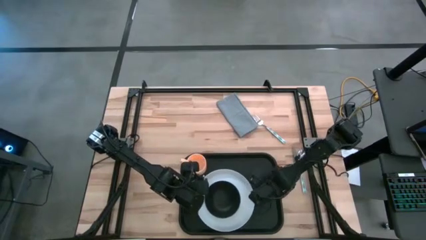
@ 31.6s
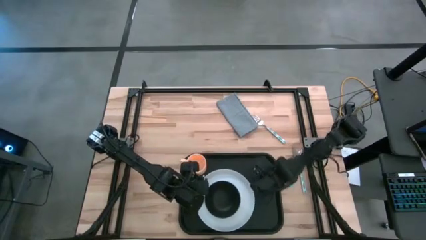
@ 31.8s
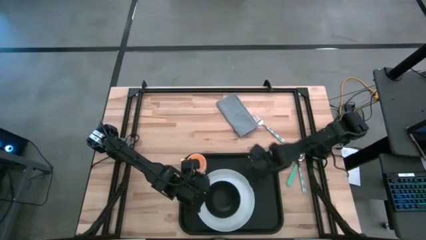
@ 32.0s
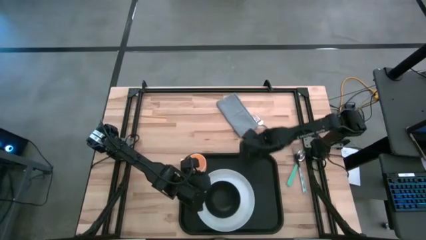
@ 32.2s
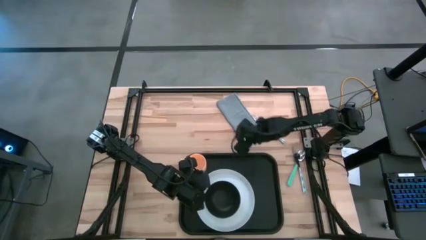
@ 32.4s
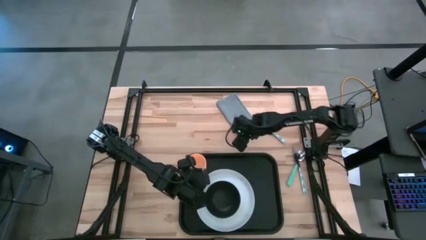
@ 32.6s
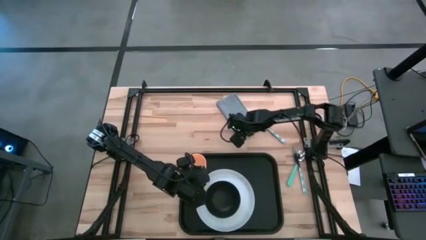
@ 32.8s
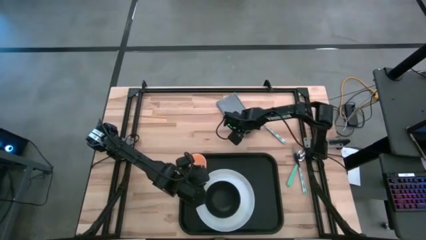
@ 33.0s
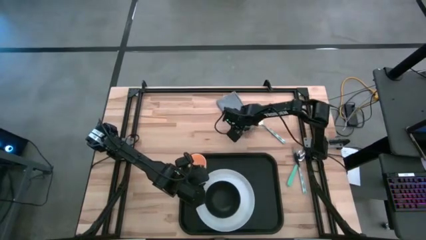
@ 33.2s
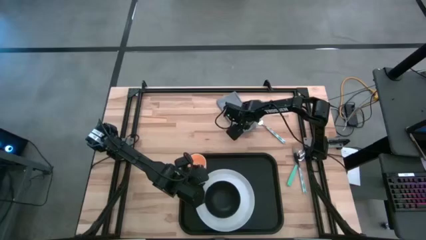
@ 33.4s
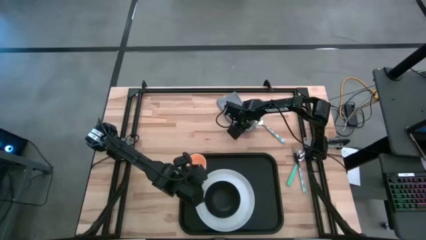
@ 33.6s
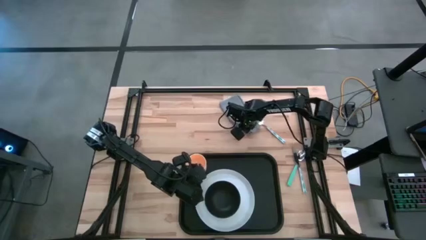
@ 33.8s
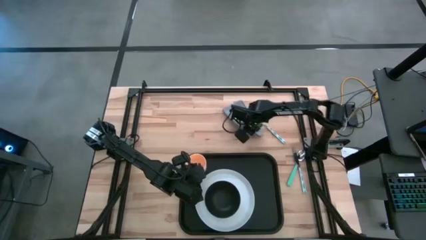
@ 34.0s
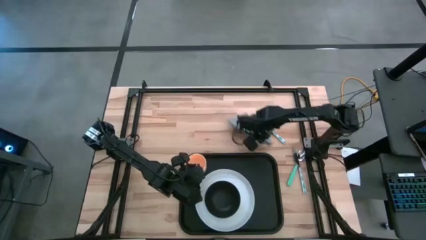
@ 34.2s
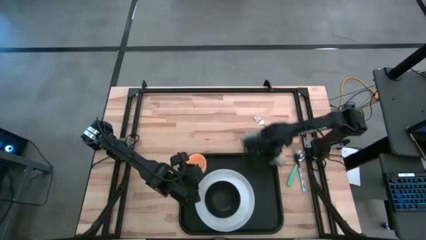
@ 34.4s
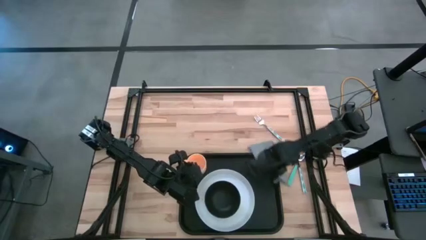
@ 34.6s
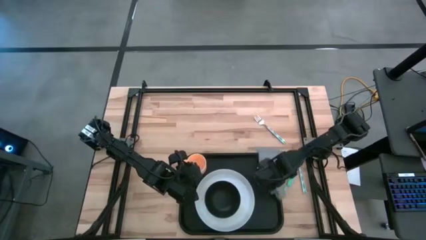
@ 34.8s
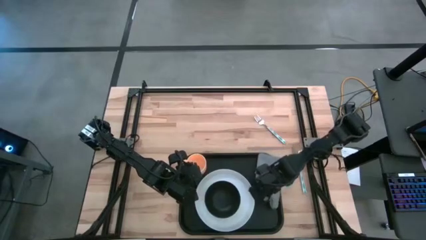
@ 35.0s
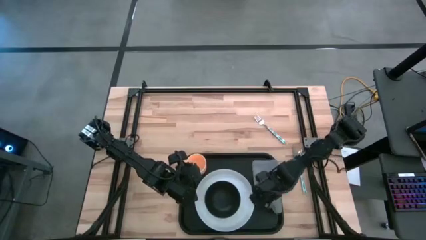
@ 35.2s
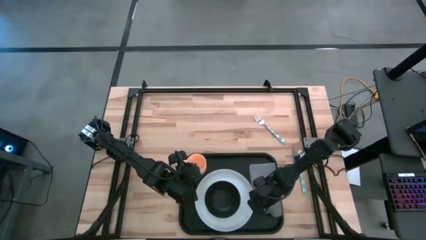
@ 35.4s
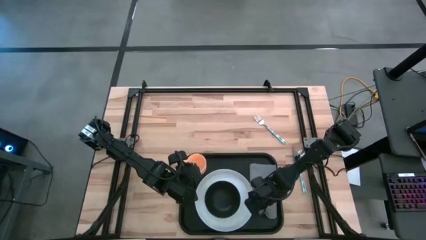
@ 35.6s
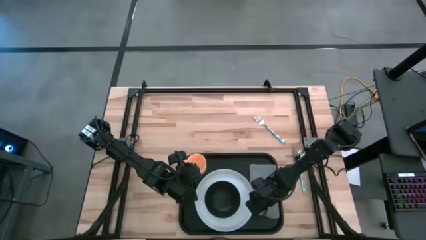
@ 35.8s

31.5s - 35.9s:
Task: Set up tray
Put the gray napkin on the black tray to the right of the white plate

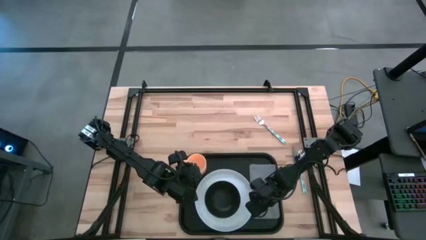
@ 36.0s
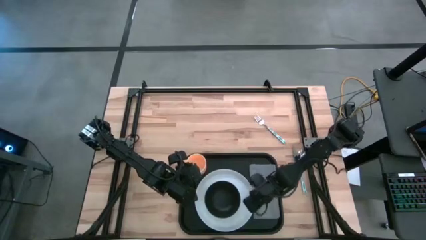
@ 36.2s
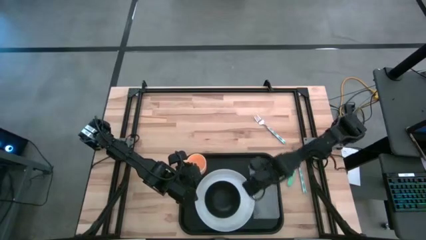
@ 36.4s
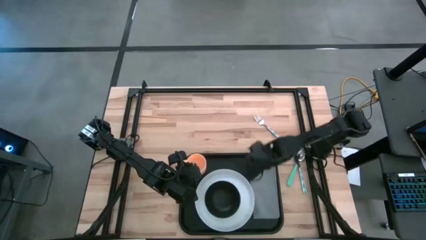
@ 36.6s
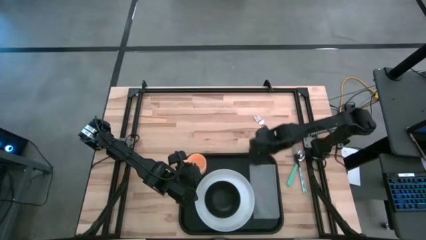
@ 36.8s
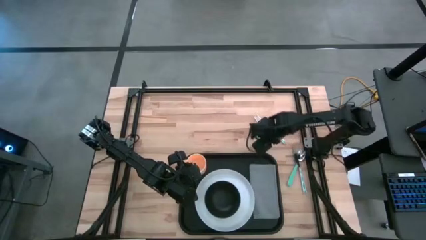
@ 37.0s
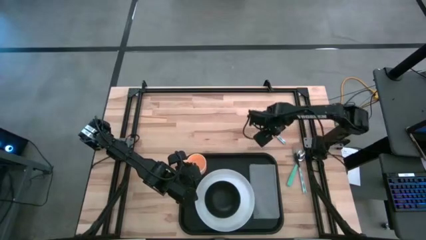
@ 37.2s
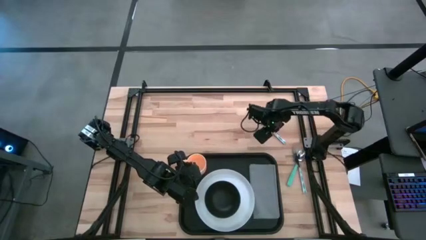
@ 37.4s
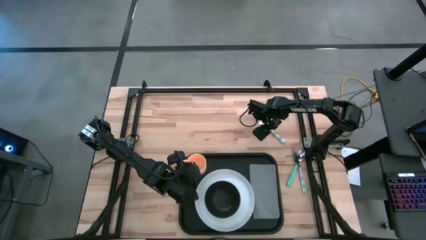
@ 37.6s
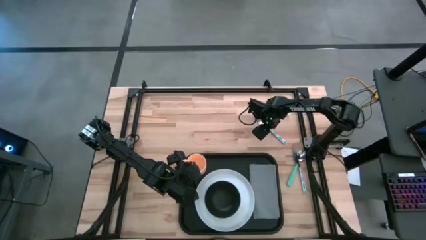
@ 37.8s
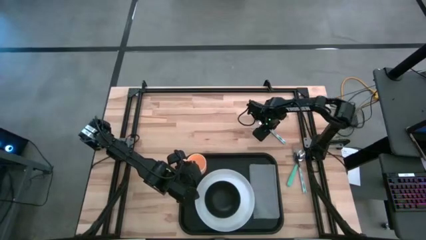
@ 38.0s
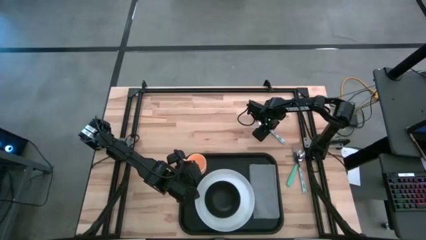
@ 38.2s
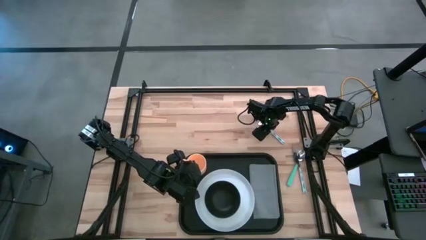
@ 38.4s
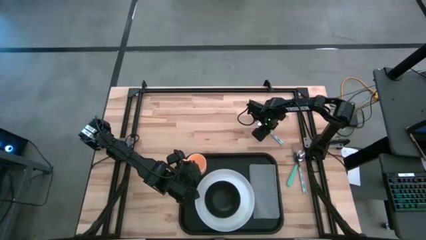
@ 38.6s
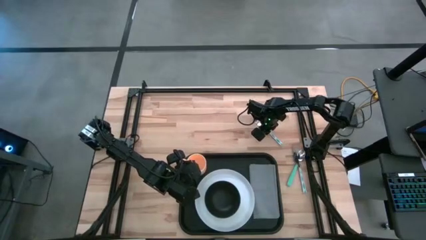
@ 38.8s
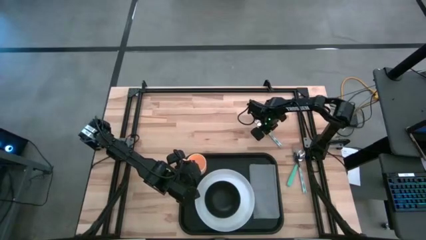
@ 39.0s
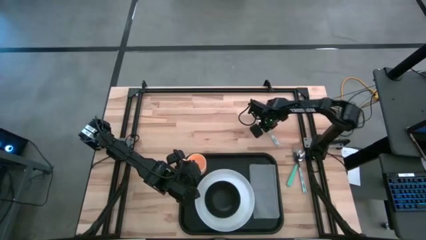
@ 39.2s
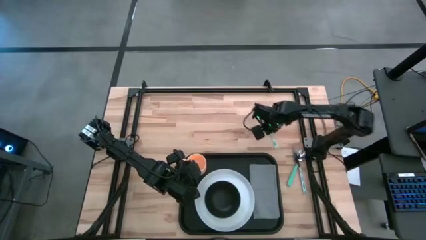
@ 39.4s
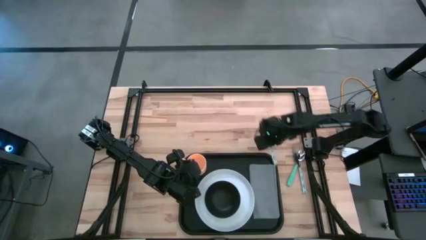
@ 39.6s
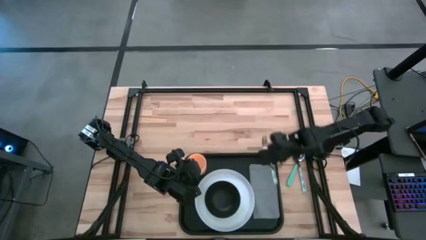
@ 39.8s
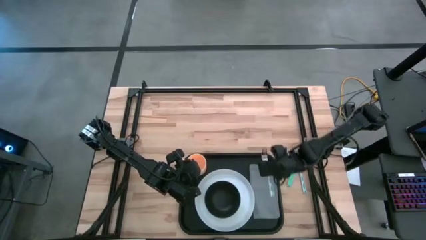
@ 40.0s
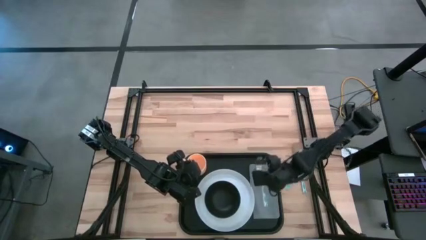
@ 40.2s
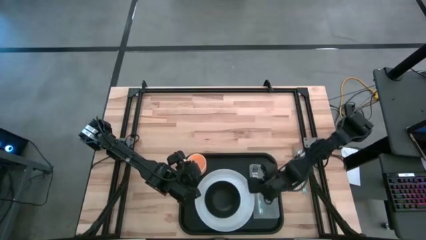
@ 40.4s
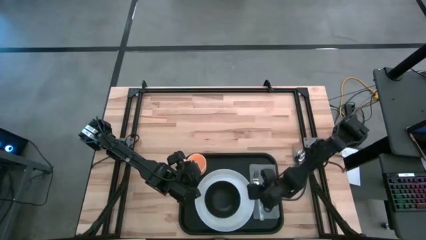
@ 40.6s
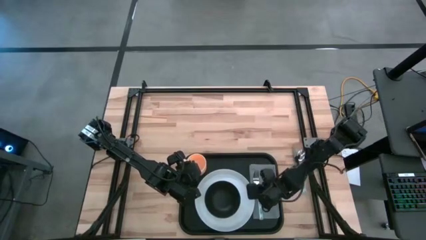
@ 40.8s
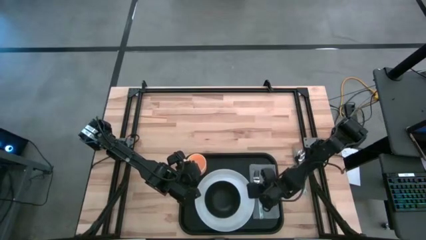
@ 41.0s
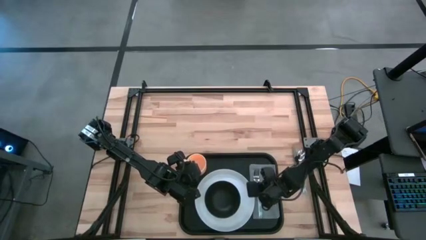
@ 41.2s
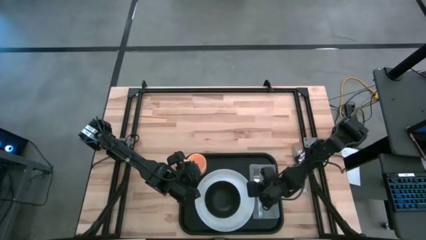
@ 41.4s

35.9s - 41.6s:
Put the green fork on the gray napkin to the right of the white plate

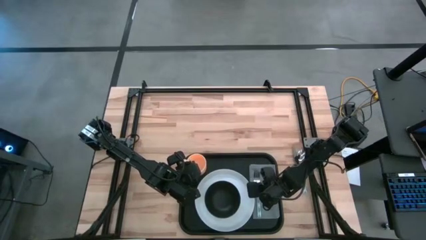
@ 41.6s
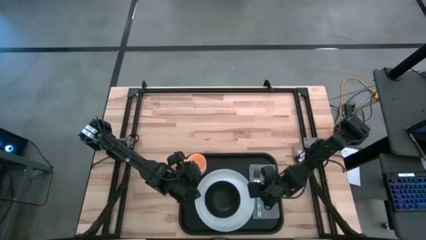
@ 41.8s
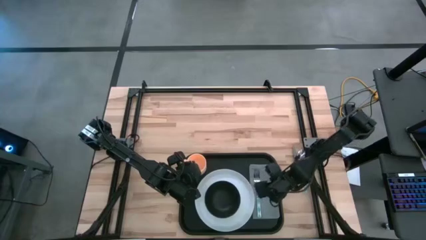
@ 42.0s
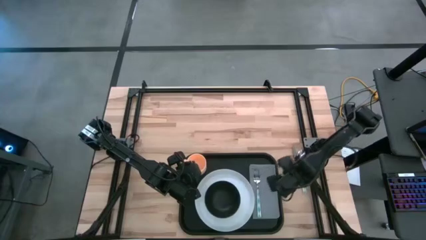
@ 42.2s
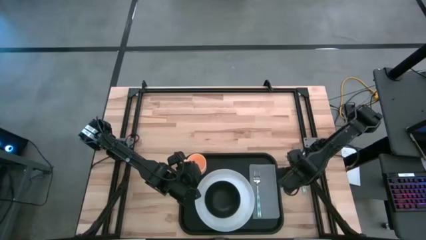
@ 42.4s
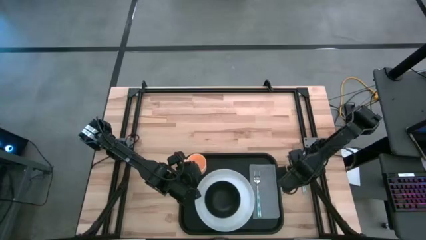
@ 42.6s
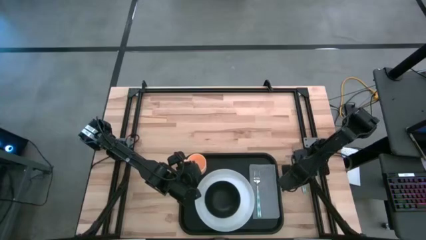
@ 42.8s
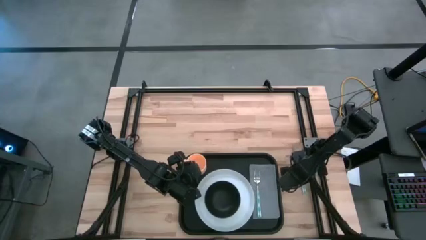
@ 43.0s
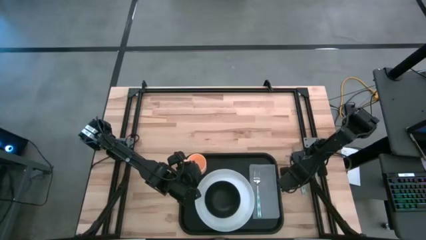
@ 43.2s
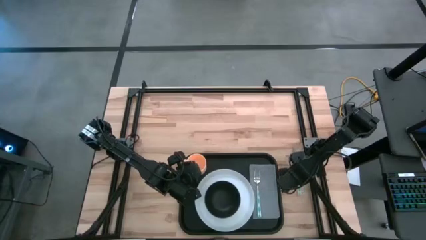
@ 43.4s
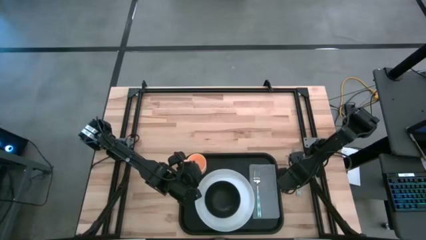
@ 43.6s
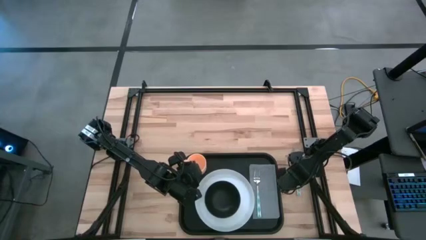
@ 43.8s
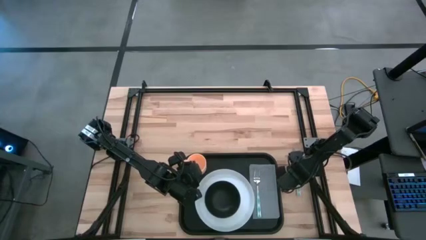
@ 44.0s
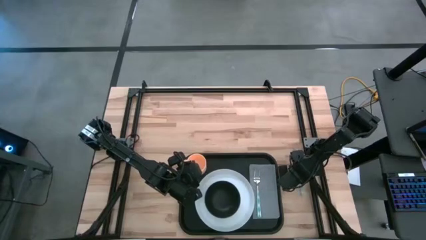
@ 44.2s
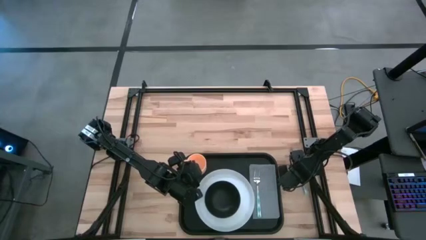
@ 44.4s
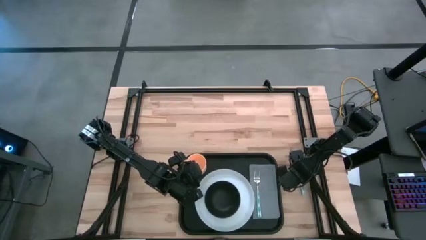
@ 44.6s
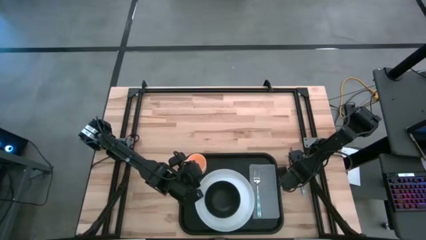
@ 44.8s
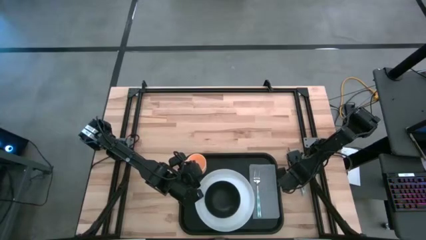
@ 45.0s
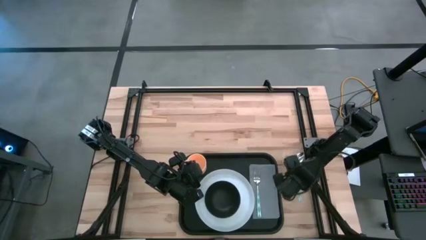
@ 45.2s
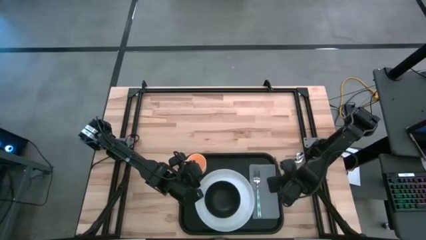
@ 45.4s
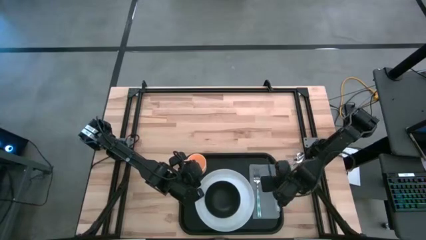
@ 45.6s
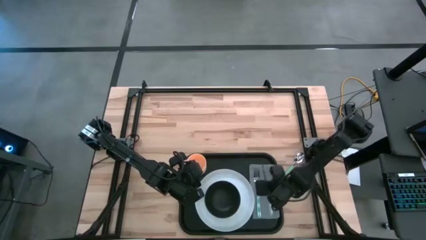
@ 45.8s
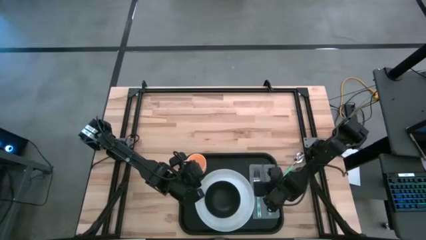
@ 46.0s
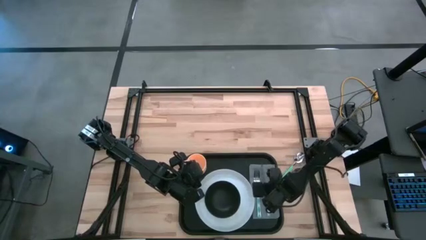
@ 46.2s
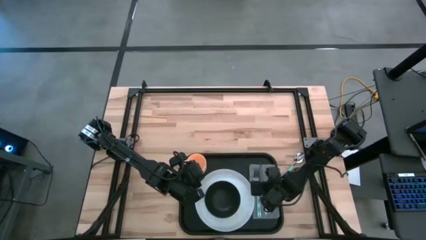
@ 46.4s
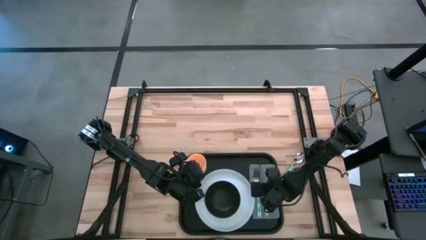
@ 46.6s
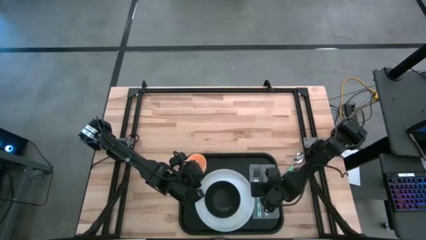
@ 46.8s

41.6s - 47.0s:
Put the green knife beside the green fork on the gray napkin

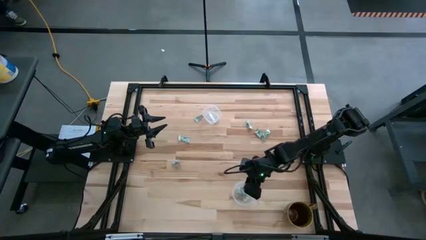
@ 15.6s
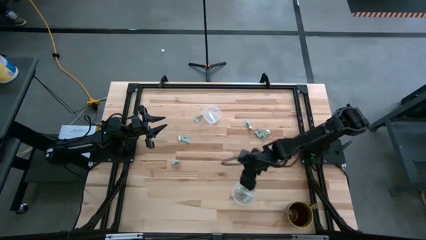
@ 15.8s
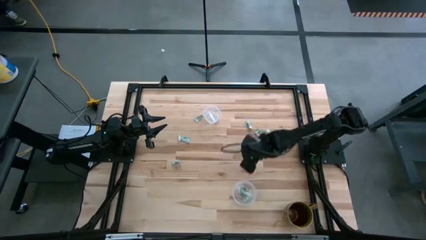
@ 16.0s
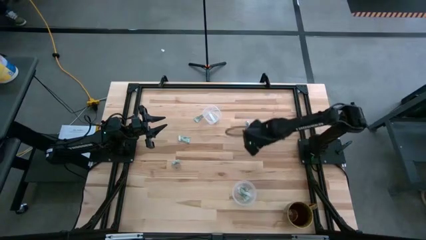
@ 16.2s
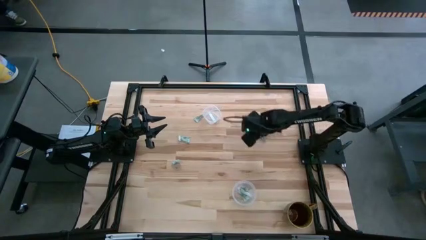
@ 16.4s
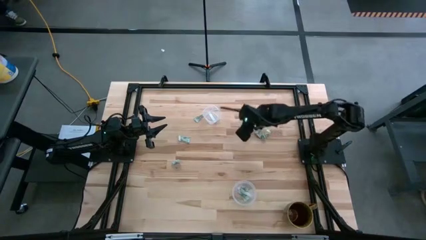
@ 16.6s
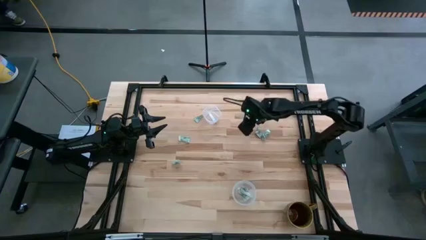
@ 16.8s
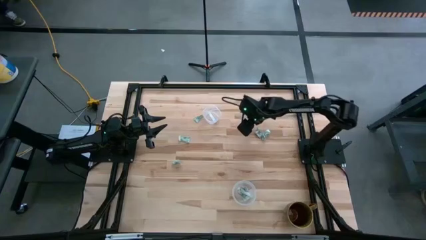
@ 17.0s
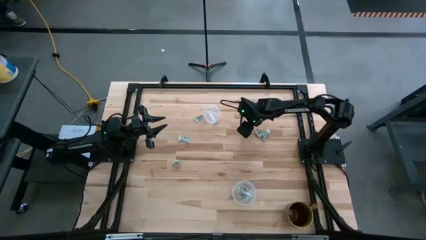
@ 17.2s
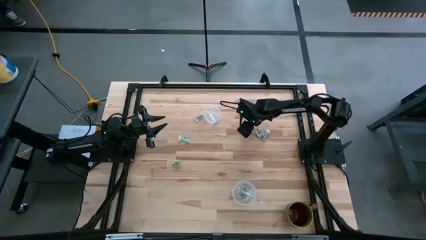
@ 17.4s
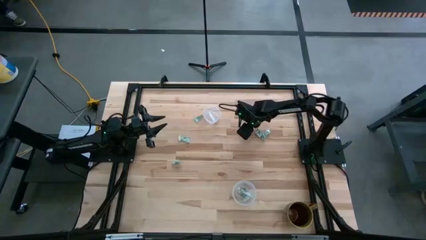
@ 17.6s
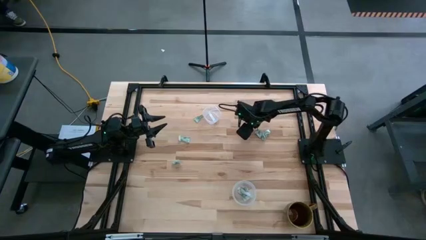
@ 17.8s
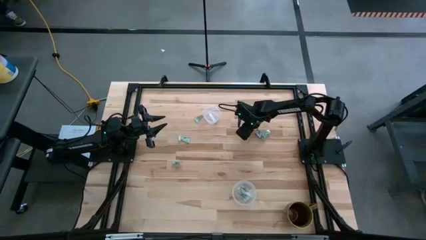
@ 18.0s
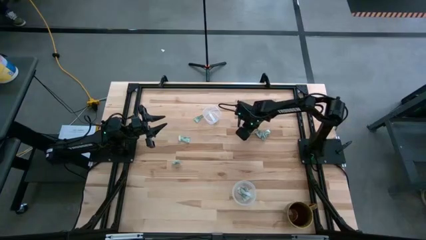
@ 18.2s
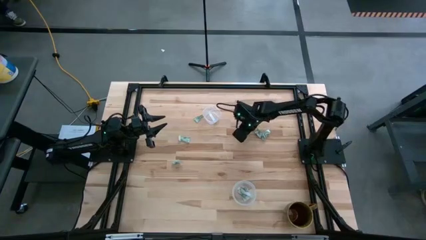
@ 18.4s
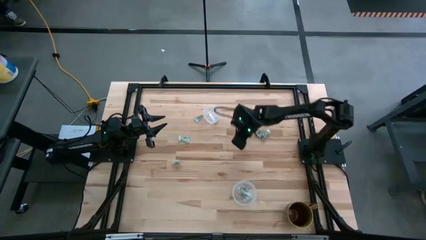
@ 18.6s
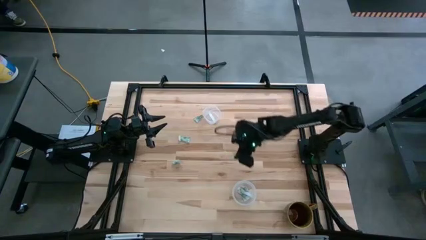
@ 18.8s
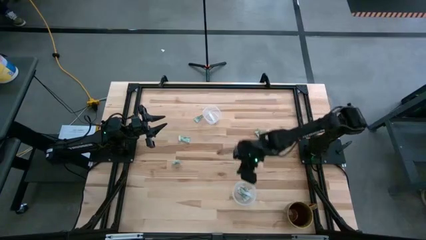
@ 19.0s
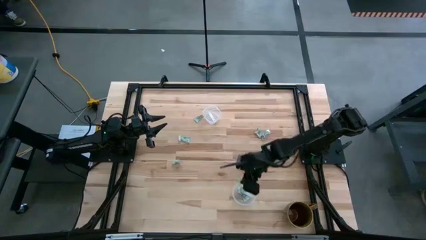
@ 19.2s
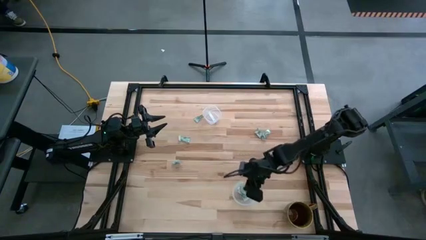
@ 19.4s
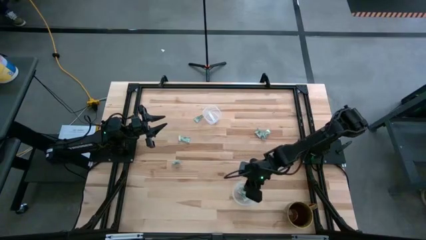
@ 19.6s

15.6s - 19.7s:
Task: Pick and place Stevia / Truvia into bins
Put the stevia packet into the bottom transparent container
